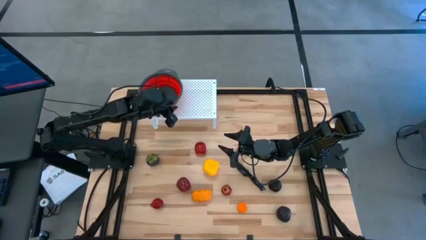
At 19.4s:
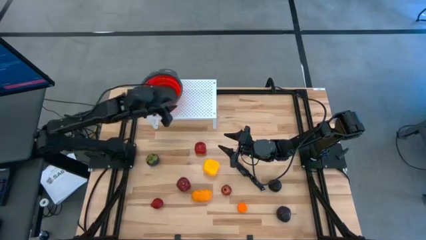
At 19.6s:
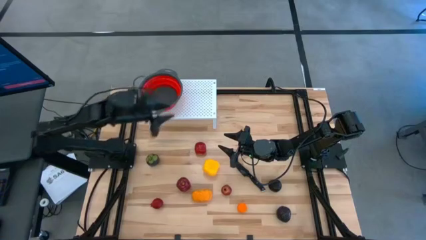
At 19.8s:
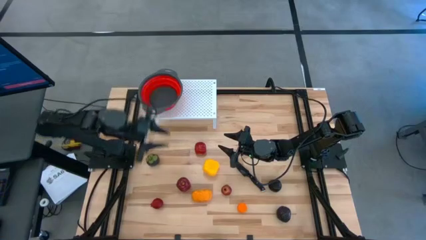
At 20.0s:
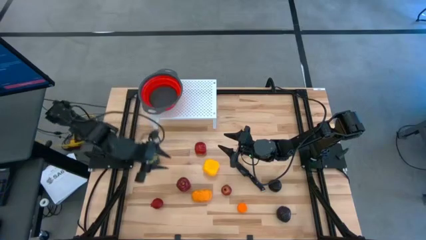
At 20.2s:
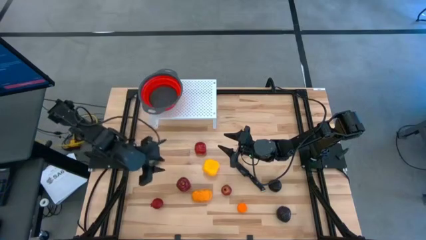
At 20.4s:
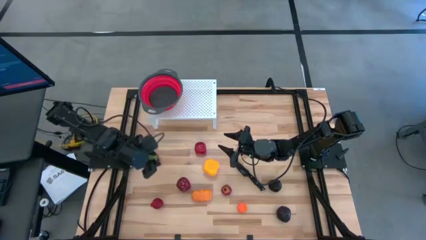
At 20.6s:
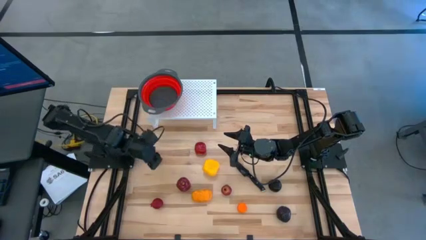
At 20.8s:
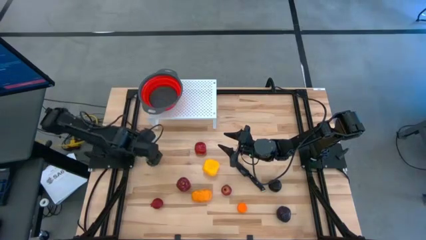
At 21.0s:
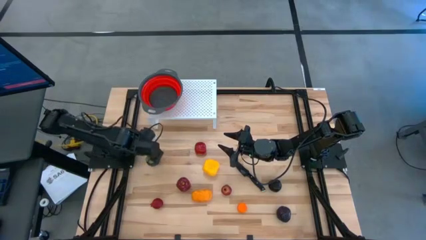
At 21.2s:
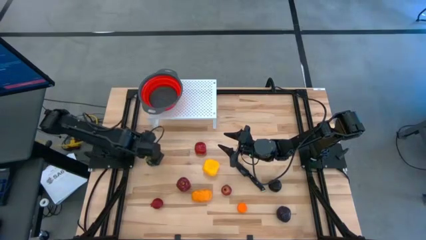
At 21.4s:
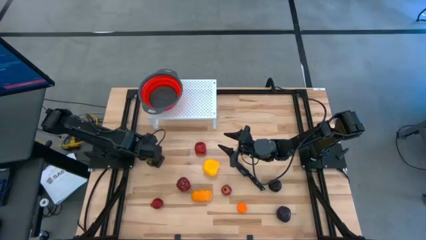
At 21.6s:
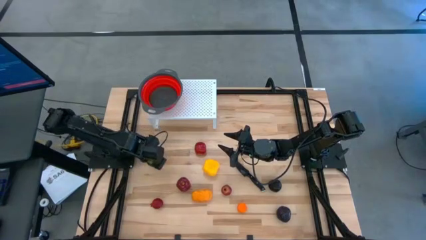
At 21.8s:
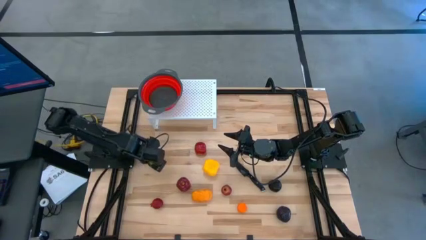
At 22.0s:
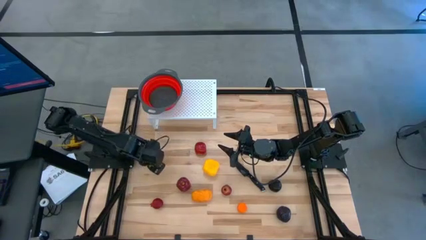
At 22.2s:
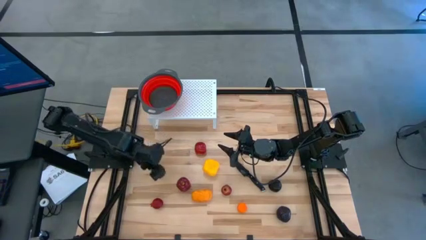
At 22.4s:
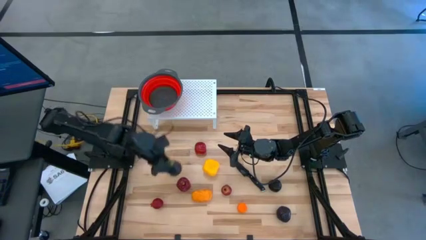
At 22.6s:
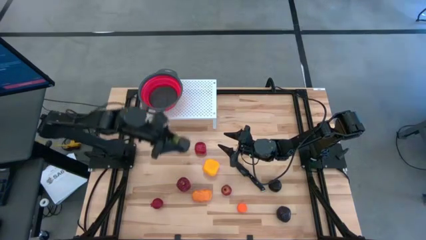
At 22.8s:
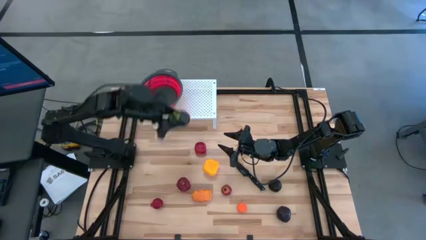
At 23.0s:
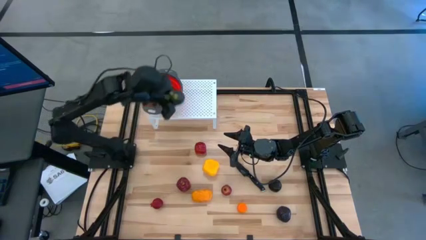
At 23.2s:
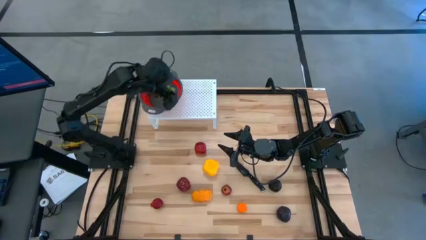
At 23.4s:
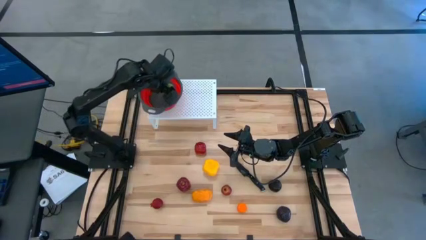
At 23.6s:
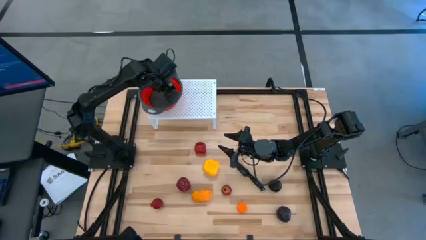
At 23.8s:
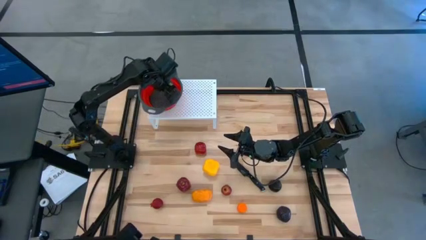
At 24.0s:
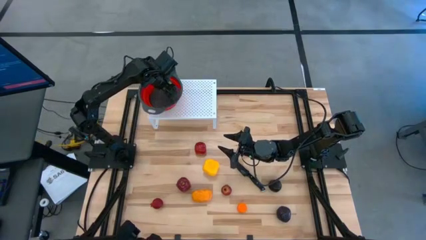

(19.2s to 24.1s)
Task: Pick & Place Fruit
Put the violet mangosteen into the red strainer bowl on the shelf

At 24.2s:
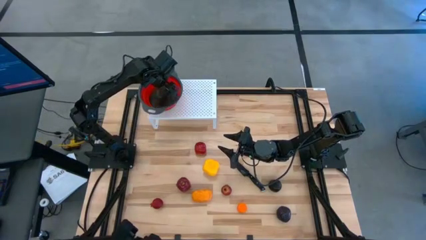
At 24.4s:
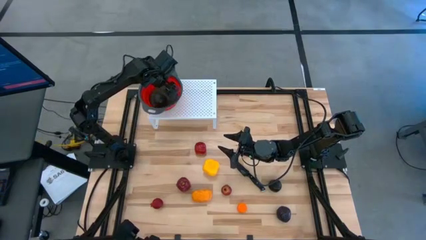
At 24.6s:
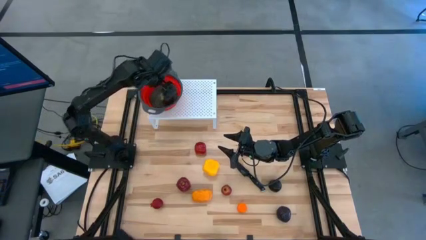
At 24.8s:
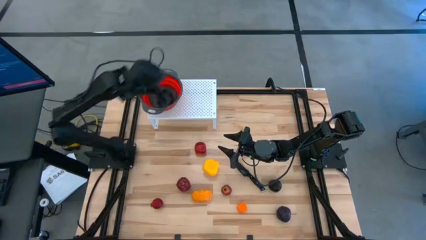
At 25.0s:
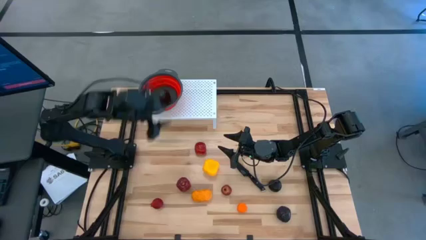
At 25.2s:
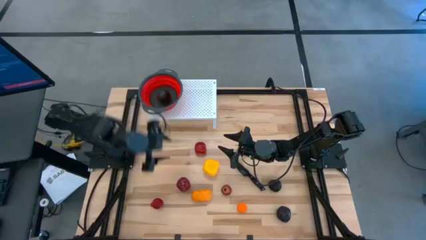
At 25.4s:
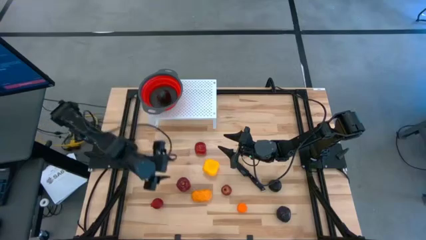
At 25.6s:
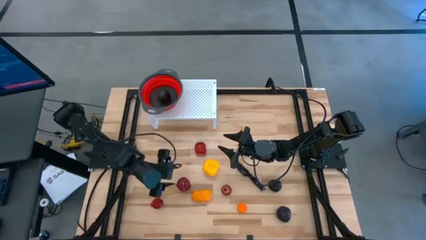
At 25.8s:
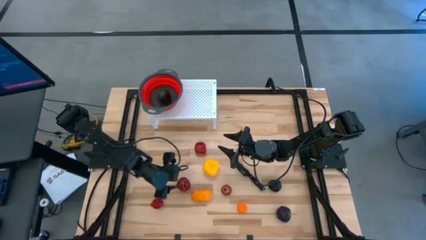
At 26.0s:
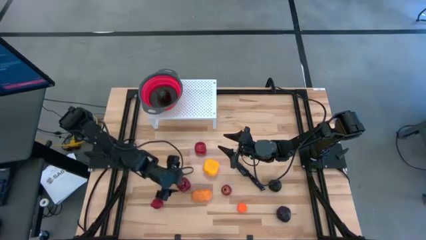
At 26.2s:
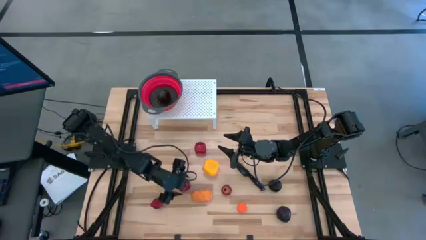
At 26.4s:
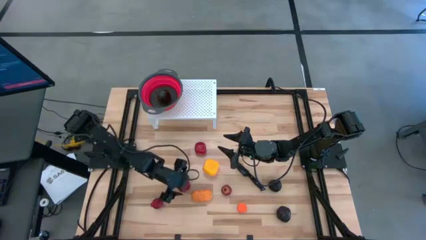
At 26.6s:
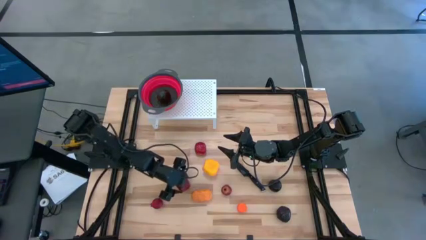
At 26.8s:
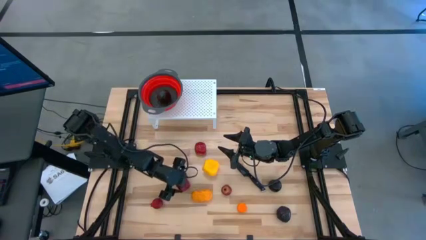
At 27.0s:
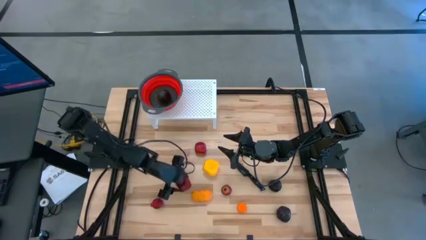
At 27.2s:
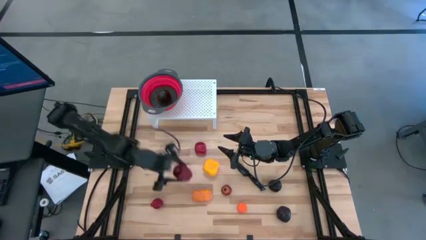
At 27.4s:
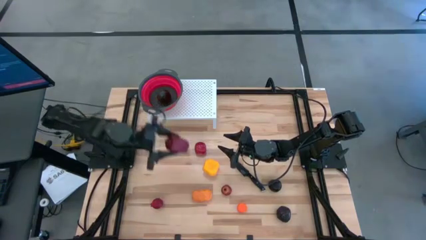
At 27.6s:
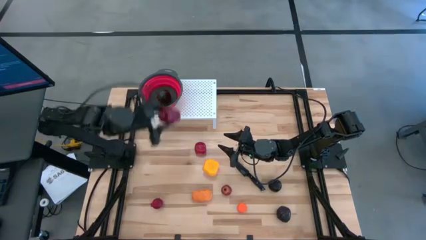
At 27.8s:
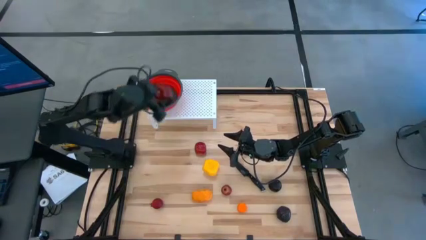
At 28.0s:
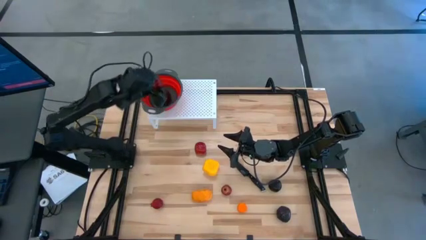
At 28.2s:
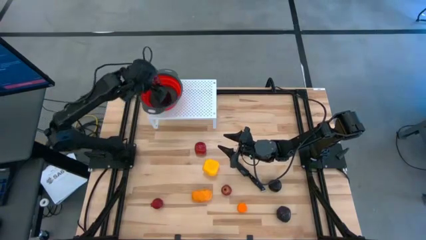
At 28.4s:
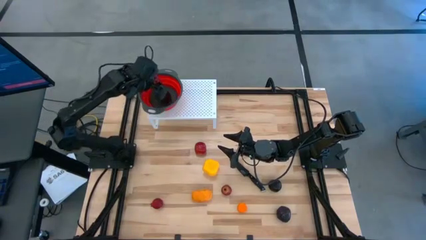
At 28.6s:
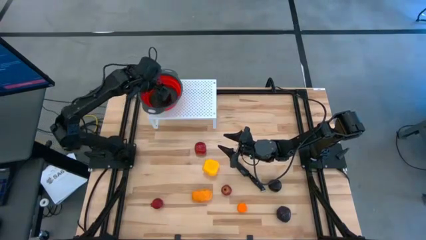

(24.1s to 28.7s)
Put the bottom red apple into the red strainer bowl on the shelf

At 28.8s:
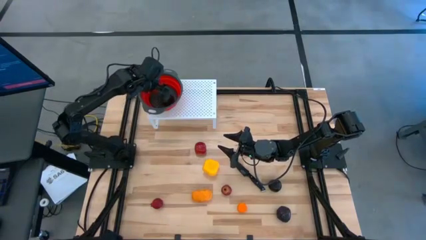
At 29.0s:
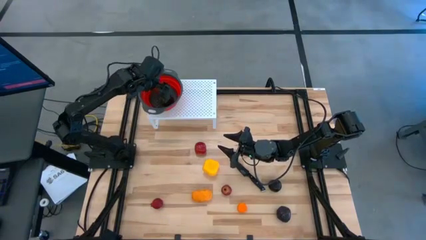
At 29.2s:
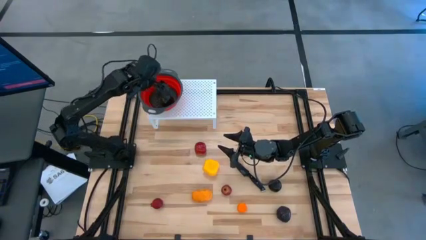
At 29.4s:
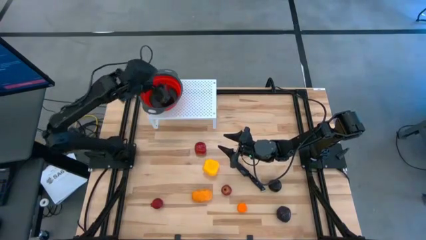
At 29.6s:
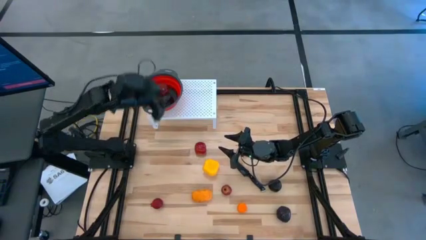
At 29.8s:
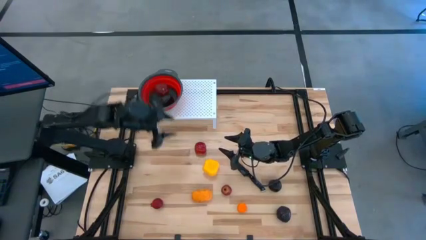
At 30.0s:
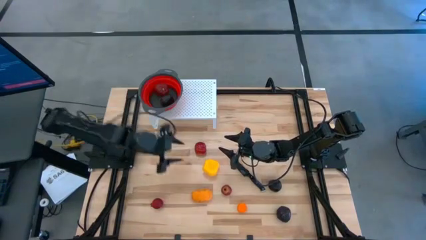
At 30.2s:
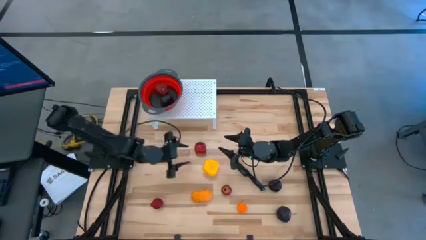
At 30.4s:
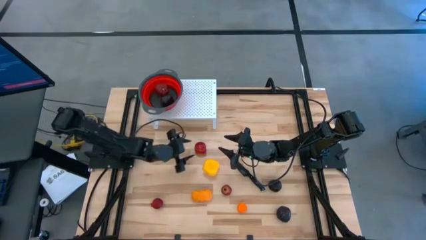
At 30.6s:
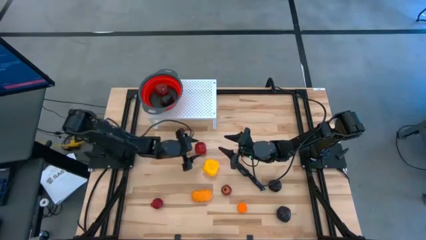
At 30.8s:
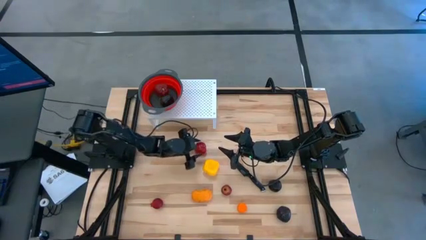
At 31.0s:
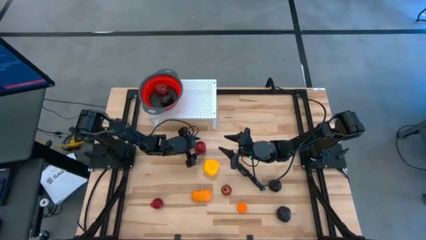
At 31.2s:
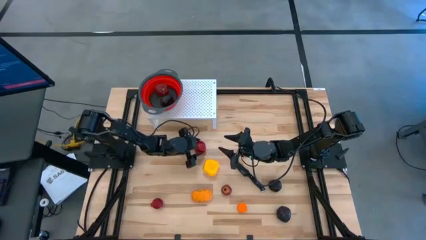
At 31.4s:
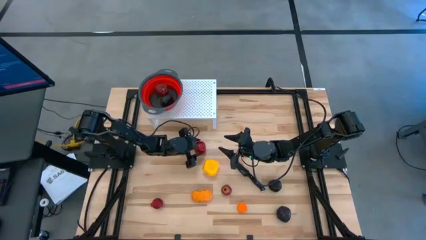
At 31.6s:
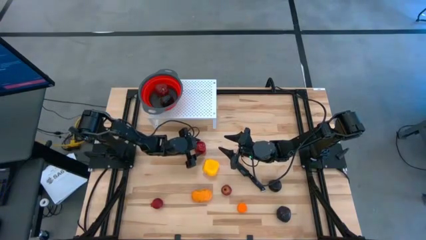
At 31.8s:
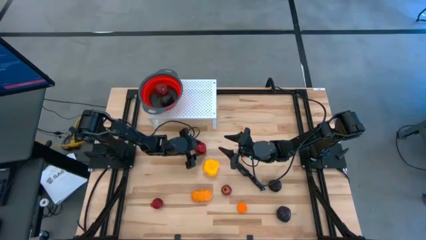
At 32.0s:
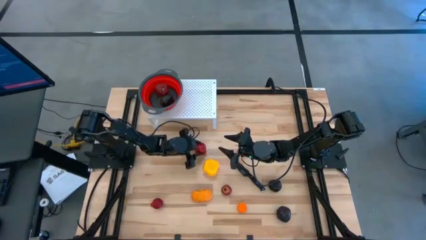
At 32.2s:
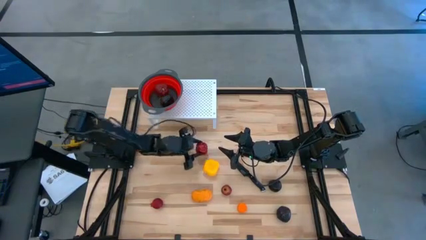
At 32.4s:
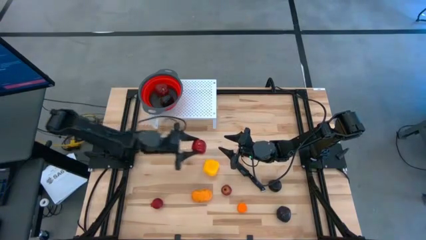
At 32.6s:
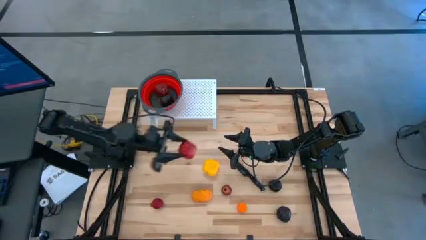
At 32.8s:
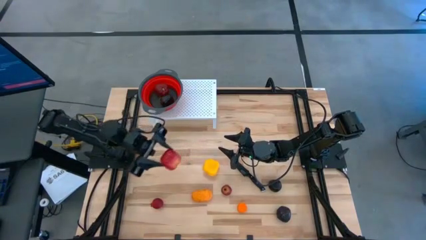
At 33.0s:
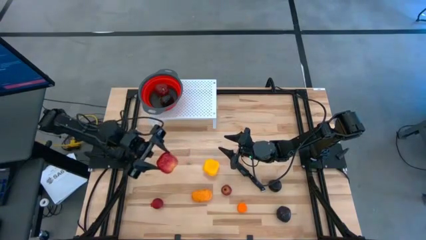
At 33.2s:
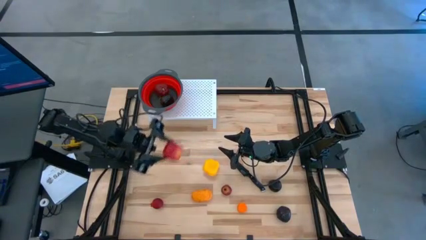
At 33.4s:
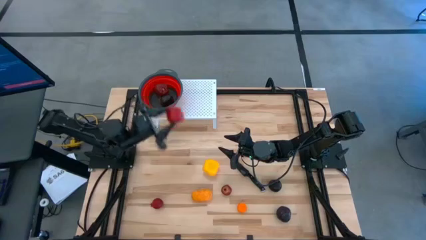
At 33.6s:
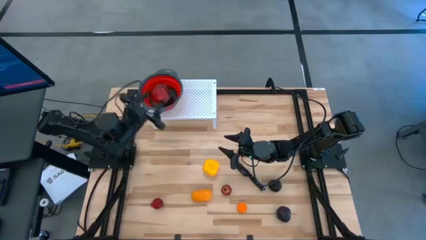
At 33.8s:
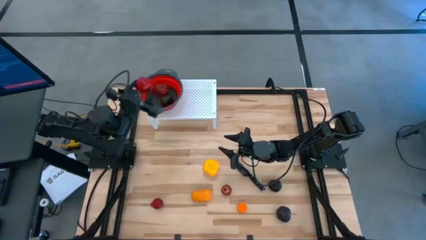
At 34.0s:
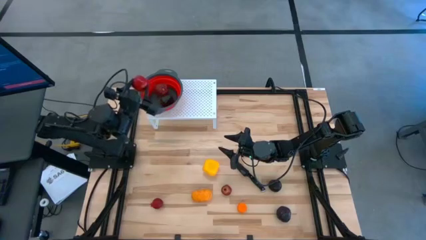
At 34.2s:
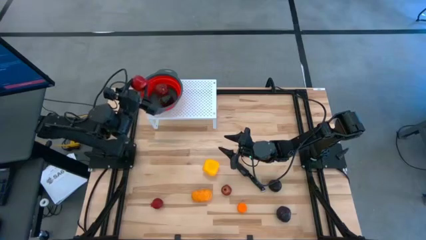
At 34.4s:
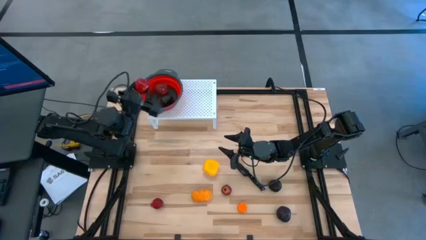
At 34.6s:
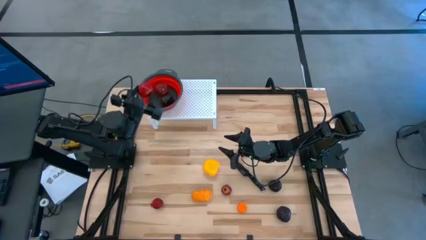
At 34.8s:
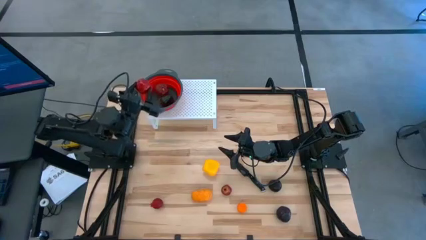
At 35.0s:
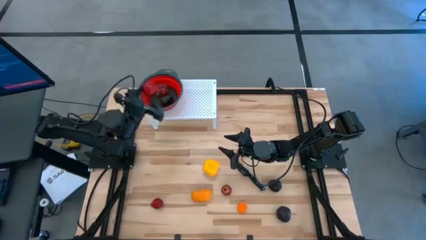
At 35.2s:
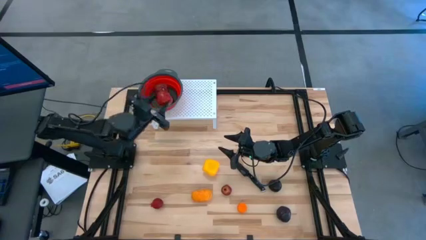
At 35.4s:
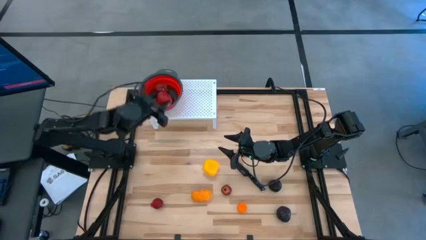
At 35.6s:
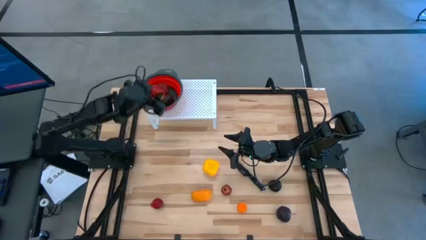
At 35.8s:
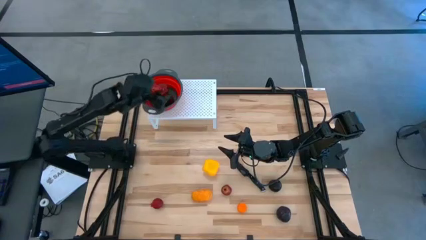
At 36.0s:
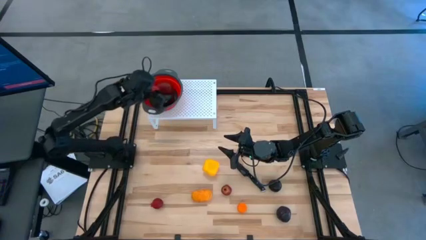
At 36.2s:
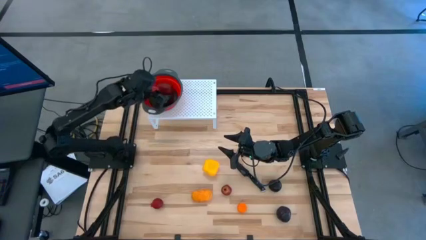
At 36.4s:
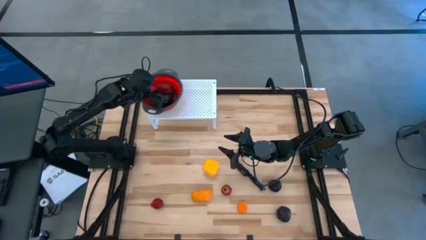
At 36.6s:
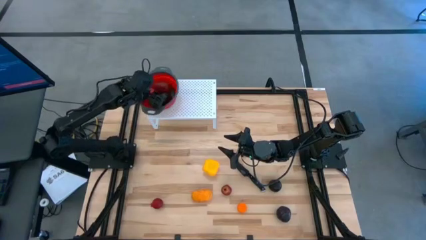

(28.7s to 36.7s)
Put the red apple into the red strainer bowl on the shelf
